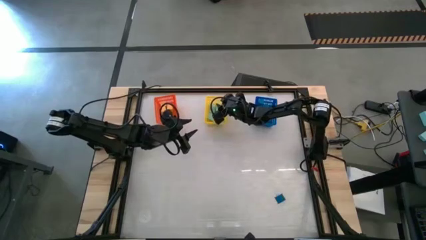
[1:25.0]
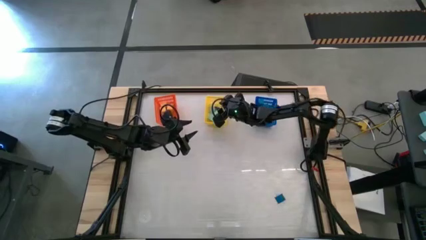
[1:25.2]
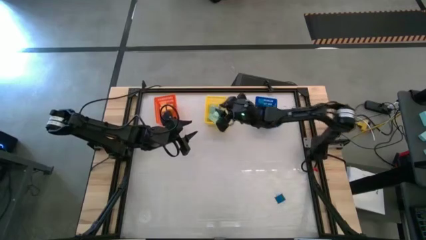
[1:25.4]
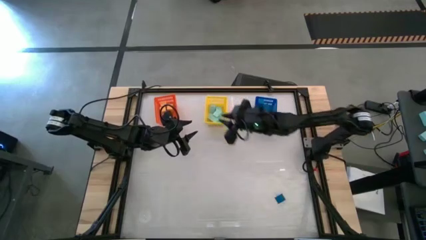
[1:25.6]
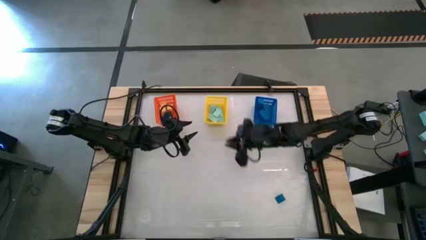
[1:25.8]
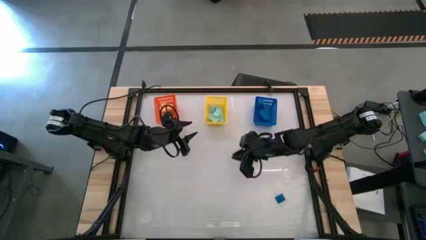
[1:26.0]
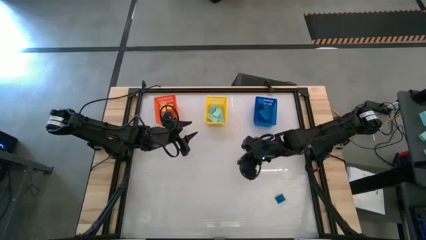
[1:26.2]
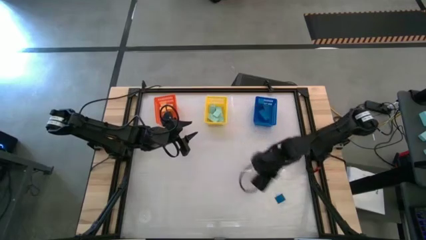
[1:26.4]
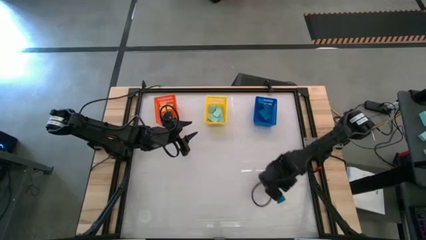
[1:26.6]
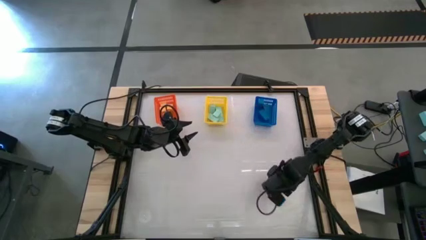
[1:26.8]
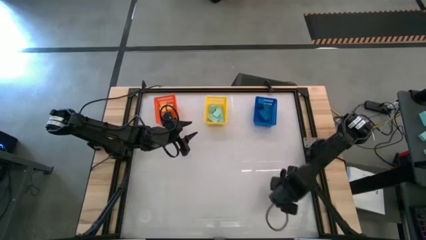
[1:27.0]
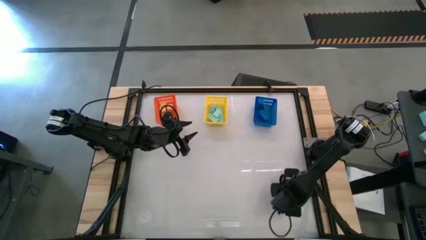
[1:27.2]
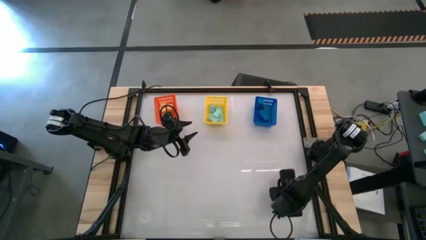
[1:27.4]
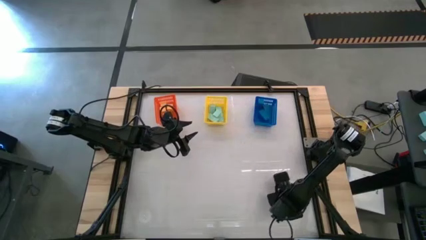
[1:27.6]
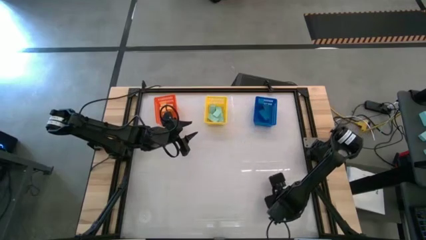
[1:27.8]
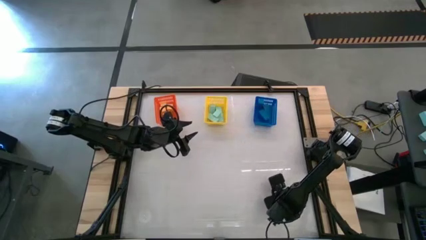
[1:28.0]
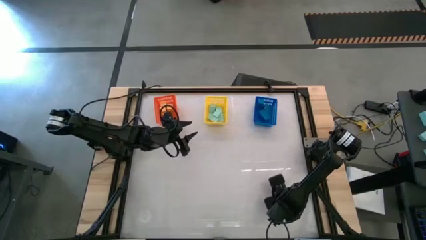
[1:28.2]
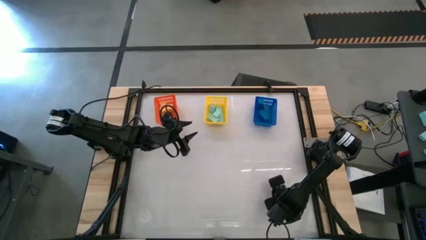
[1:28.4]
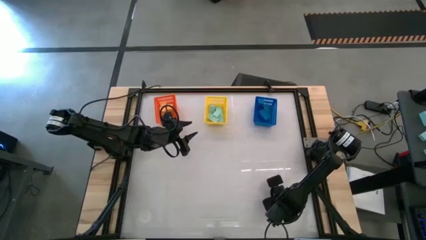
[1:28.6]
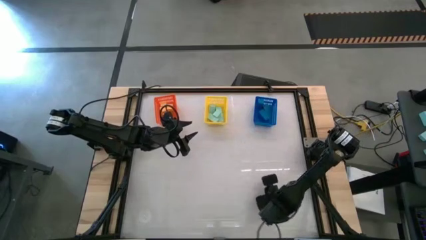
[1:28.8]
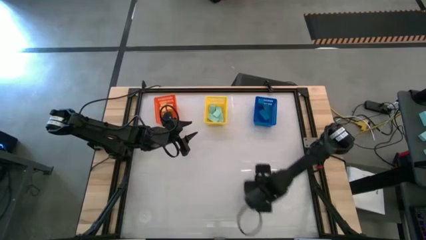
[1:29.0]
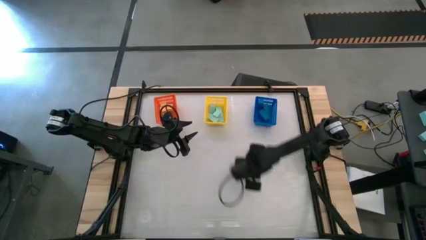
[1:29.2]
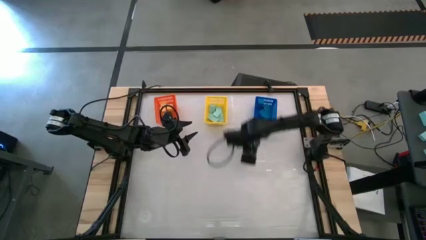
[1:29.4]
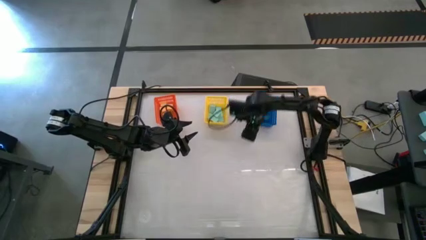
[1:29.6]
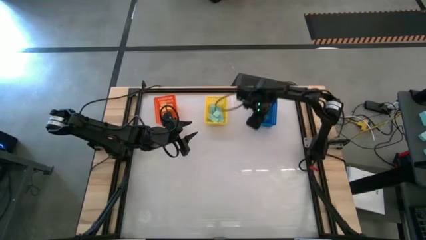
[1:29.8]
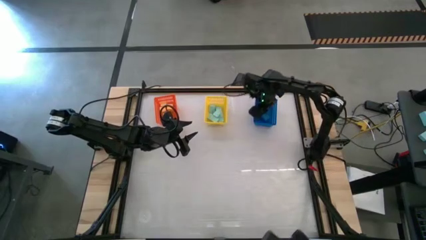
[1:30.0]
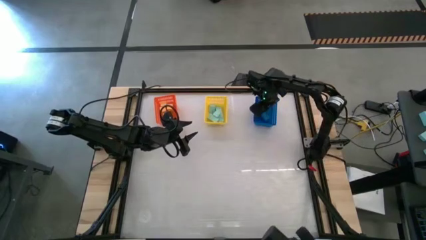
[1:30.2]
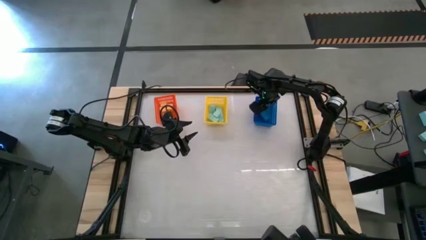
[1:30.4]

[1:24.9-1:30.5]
Task: Sort & place blocks by color
Put the blue block into the blue bin

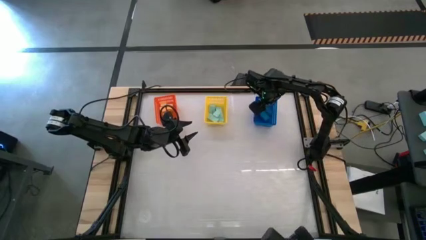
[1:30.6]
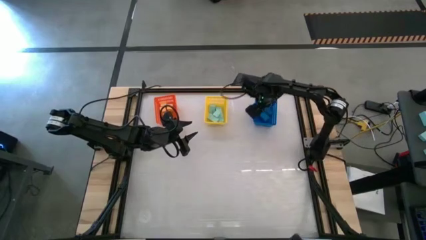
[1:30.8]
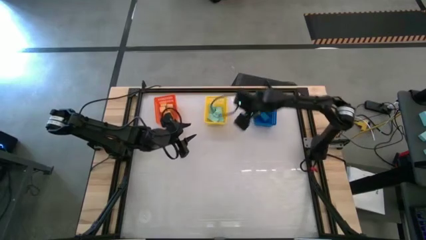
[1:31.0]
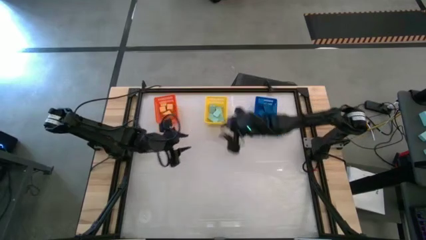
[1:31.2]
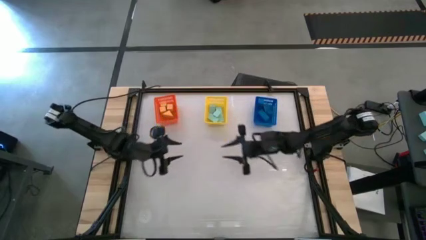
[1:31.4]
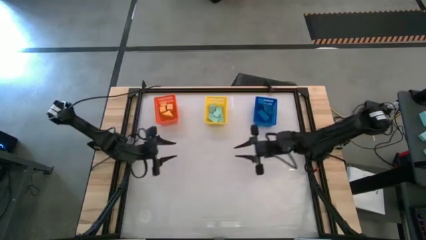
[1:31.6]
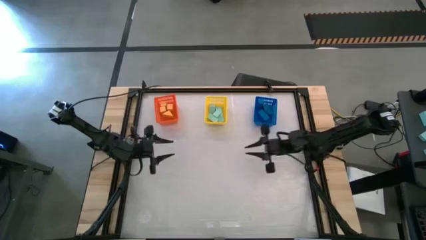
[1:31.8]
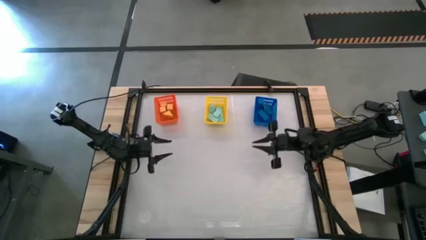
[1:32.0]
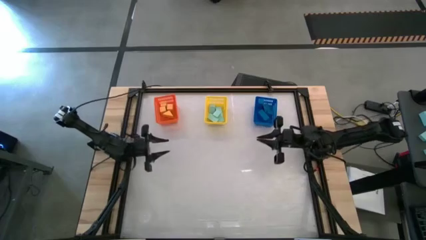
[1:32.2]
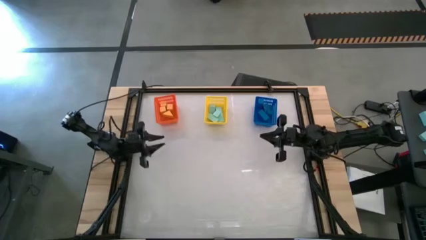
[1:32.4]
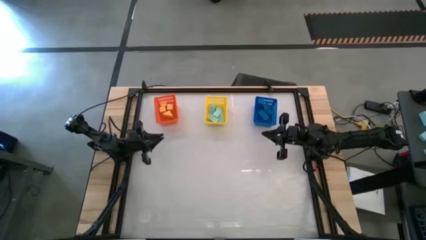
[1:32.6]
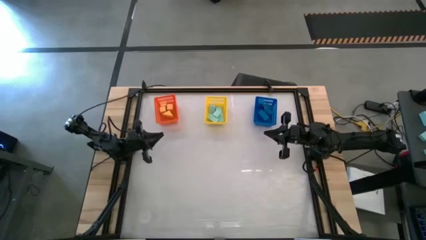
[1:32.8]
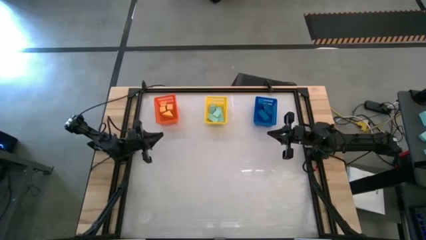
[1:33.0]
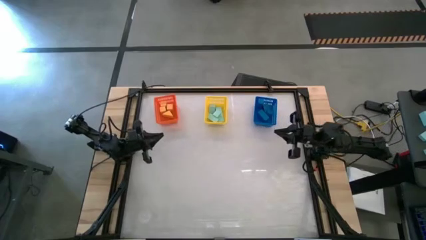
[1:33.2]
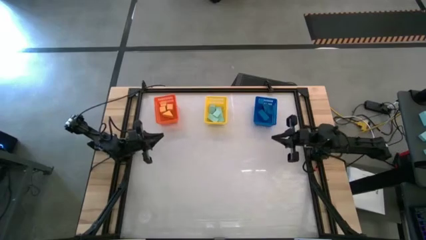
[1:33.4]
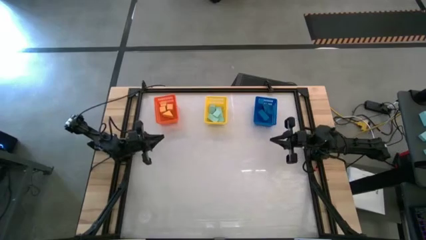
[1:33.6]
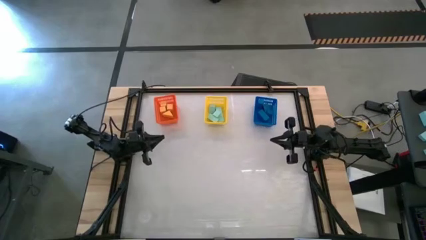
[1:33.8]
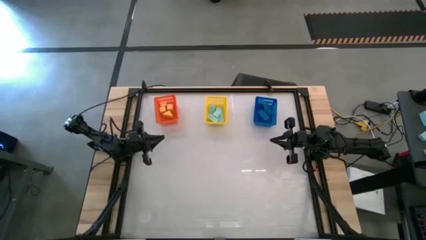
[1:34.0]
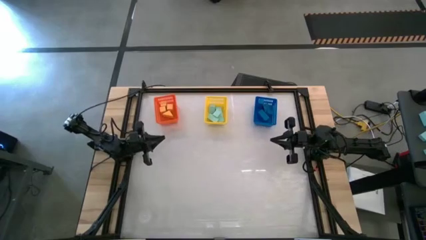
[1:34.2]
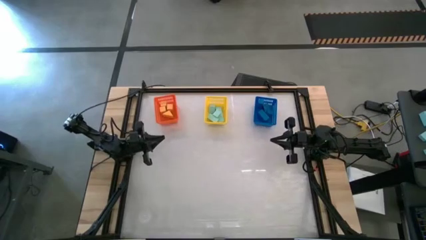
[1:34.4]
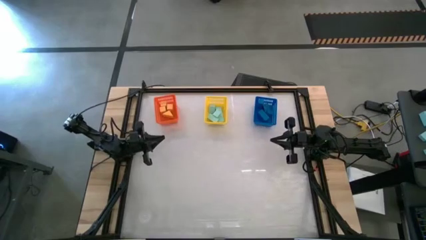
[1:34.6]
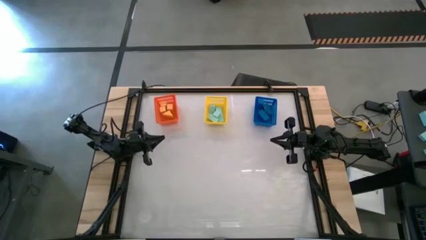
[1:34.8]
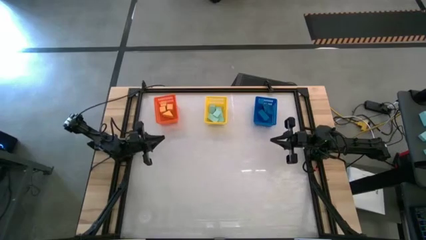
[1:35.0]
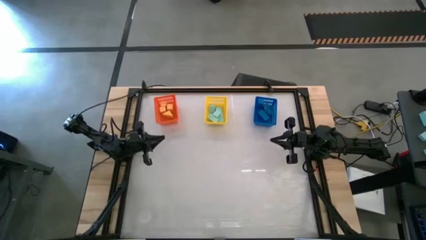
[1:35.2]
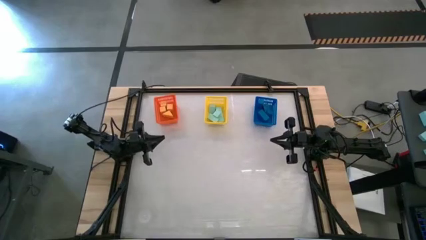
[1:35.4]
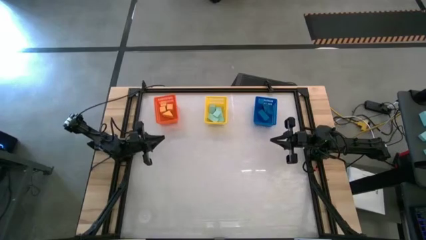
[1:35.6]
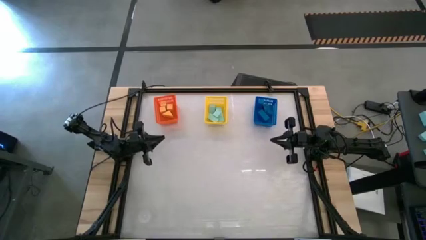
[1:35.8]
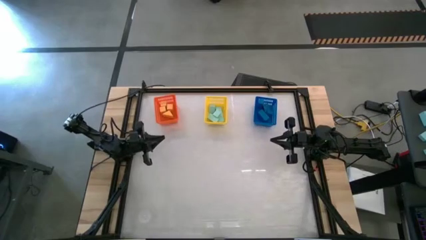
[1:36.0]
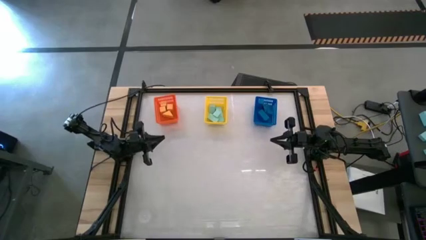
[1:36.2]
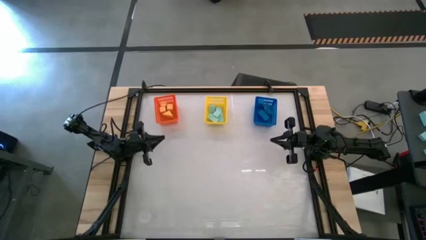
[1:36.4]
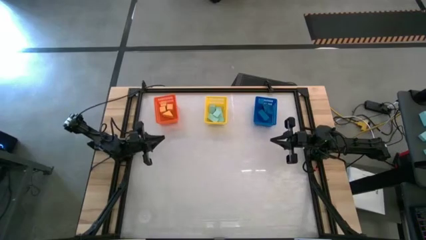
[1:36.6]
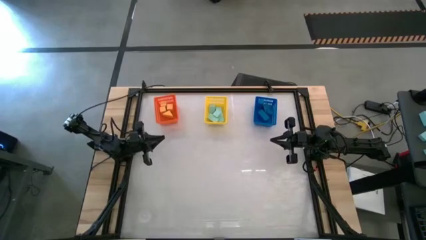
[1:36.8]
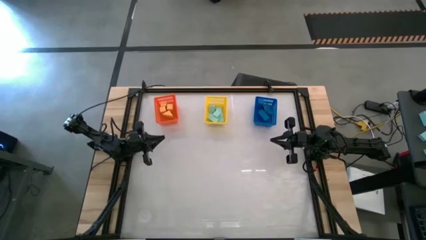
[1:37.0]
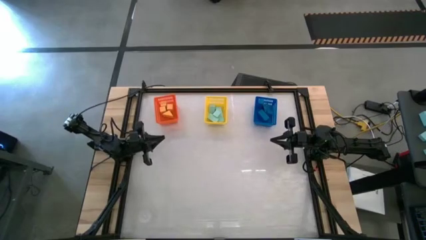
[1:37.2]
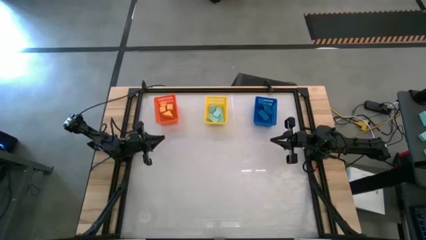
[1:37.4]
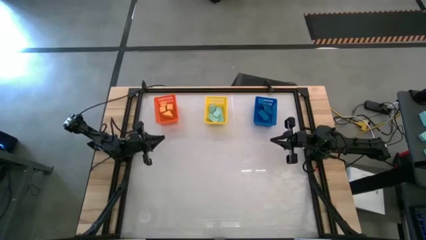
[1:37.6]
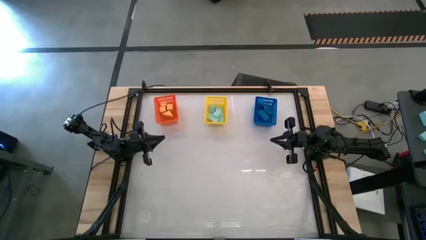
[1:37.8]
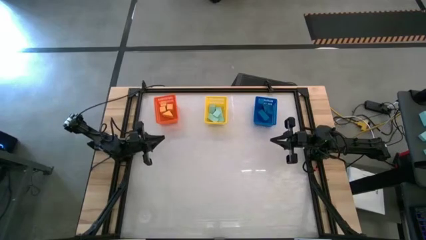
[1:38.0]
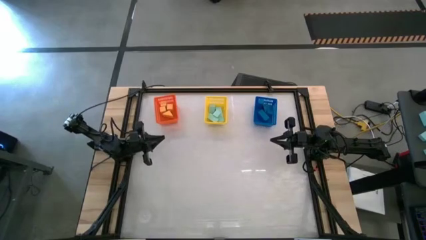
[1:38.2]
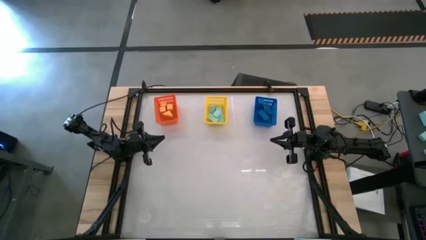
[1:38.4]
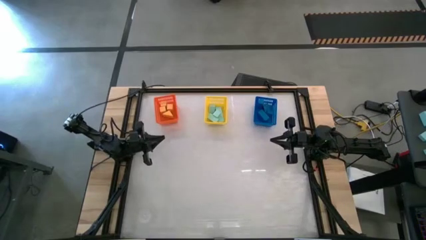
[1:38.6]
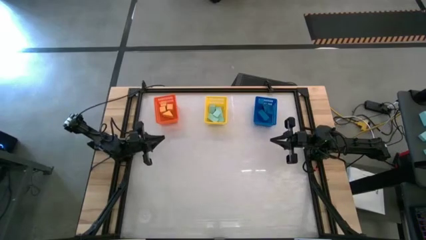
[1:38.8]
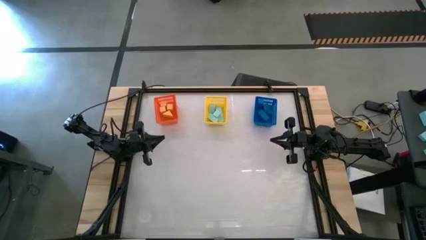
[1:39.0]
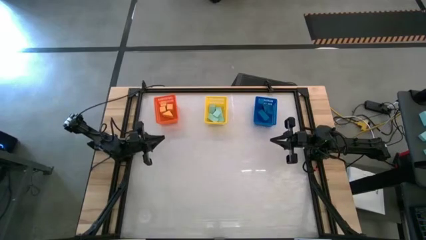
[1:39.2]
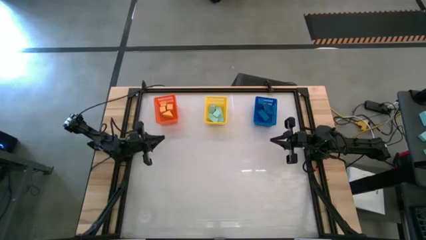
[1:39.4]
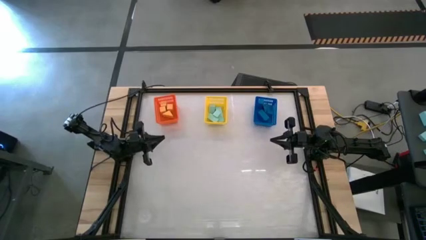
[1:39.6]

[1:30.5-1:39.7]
Return to Home Position
